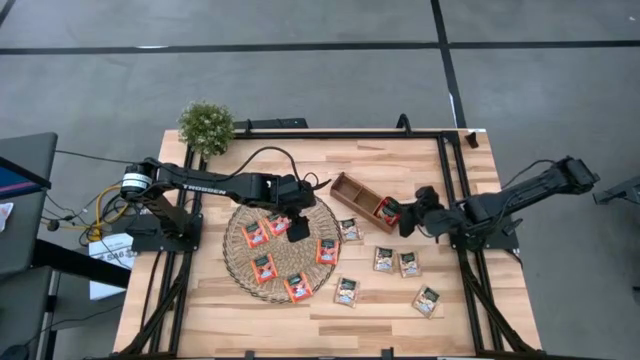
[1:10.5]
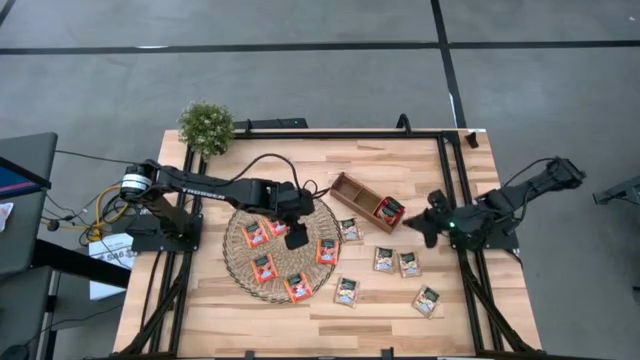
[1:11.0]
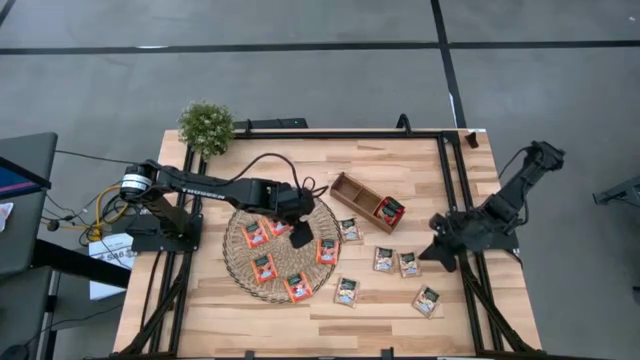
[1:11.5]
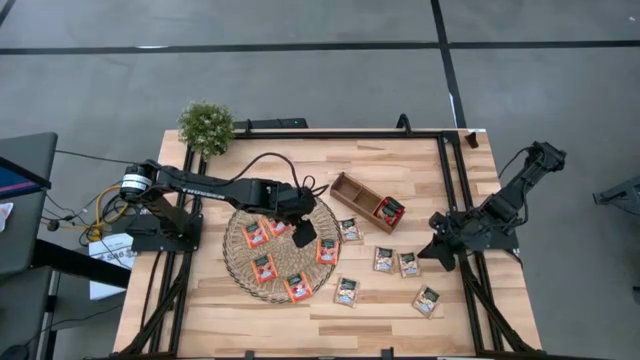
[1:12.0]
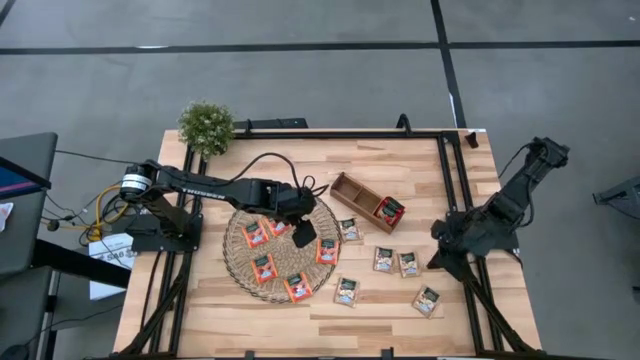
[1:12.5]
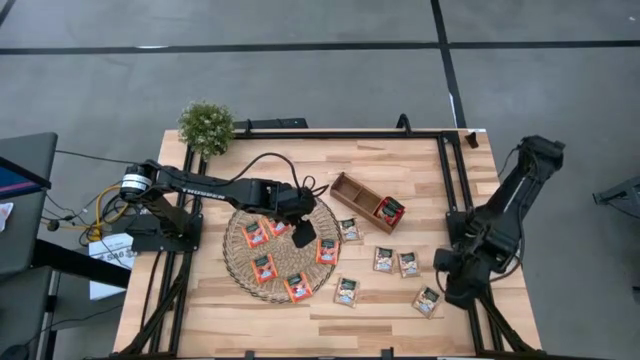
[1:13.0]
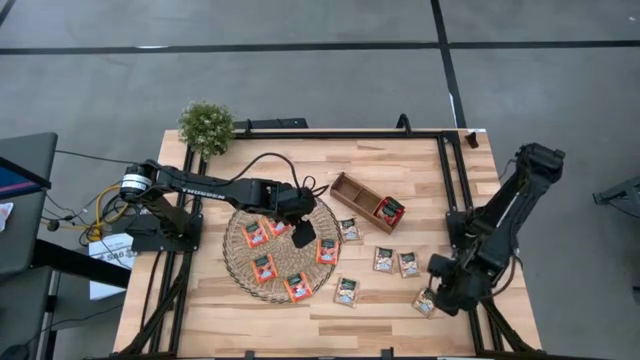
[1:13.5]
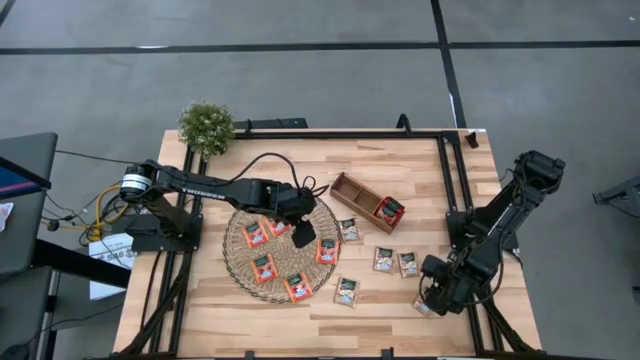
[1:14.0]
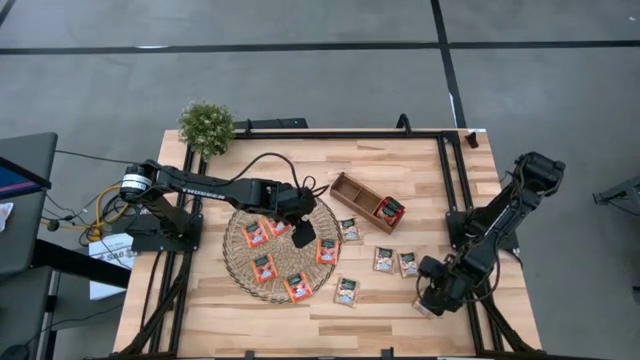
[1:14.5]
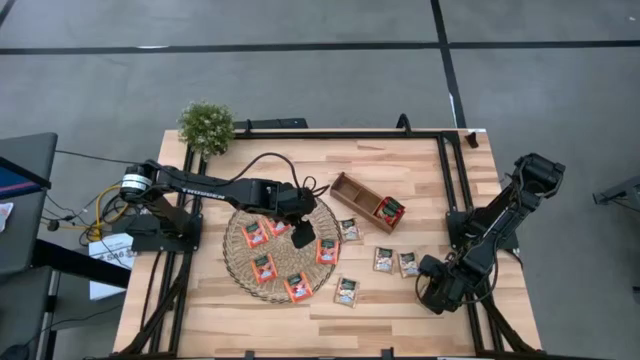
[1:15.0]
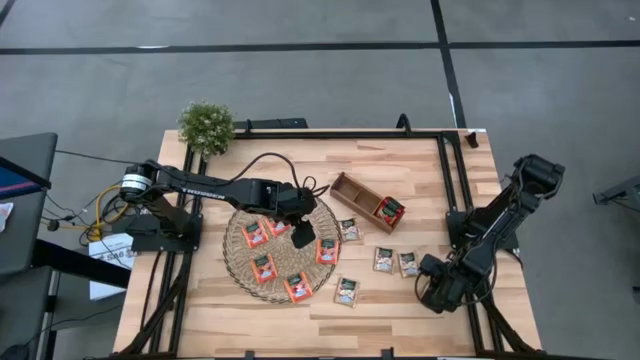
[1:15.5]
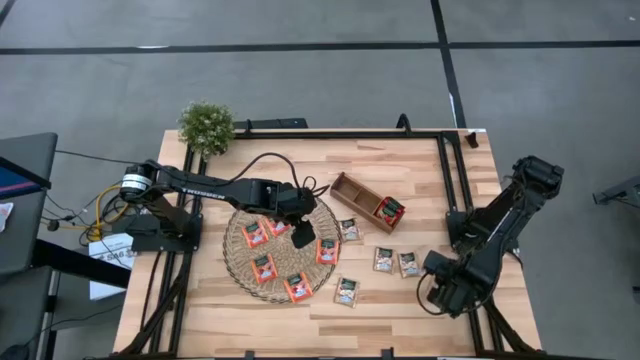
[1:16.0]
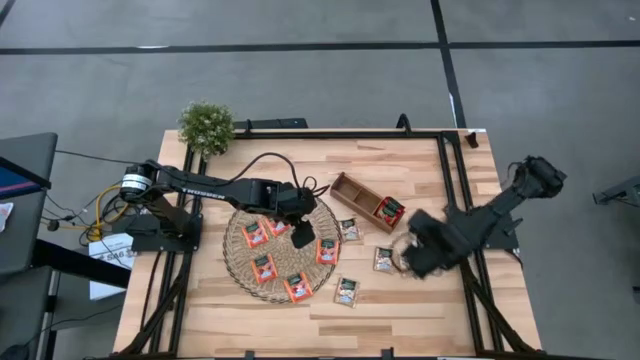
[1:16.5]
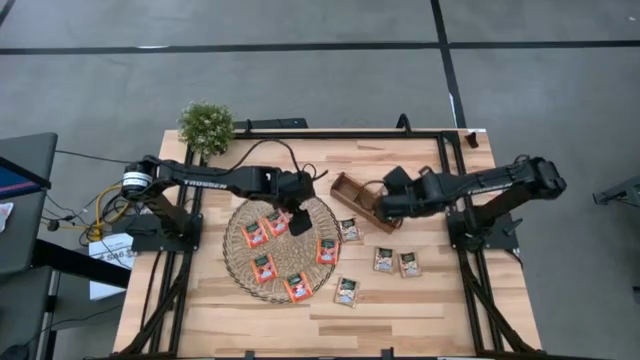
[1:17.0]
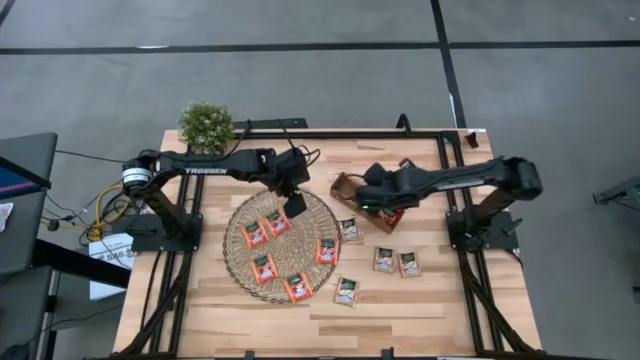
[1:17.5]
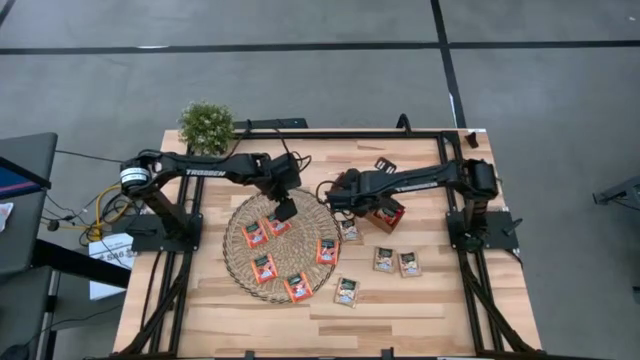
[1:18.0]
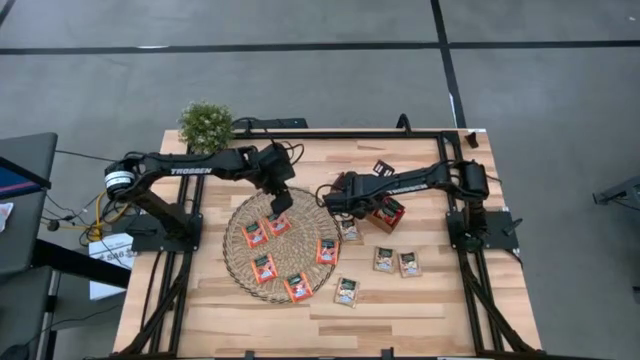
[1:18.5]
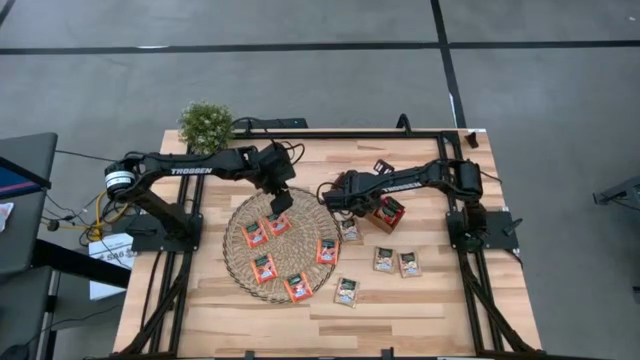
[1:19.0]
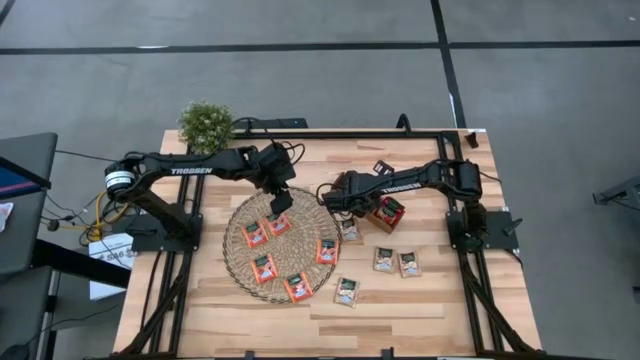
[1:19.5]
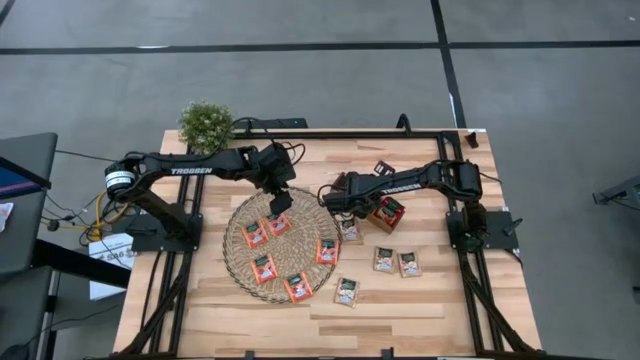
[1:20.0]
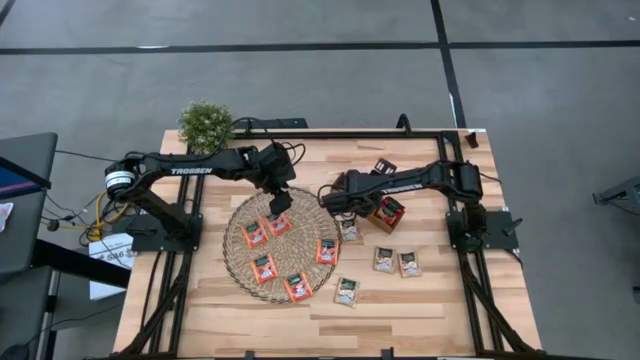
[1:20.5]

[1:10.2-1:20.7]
Task: Pick & Place Tea
Put the brown tea bag into the middle section of the wooden organizer

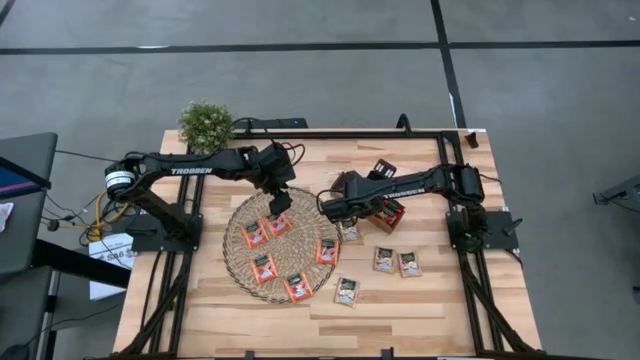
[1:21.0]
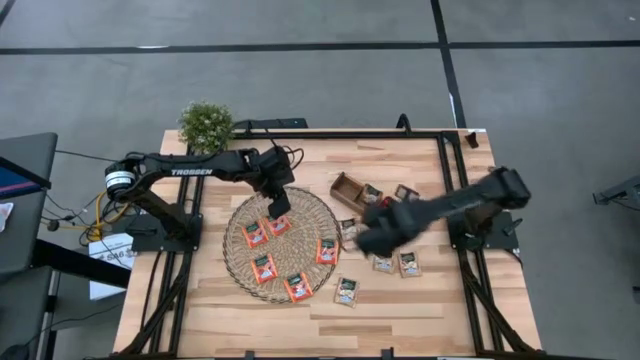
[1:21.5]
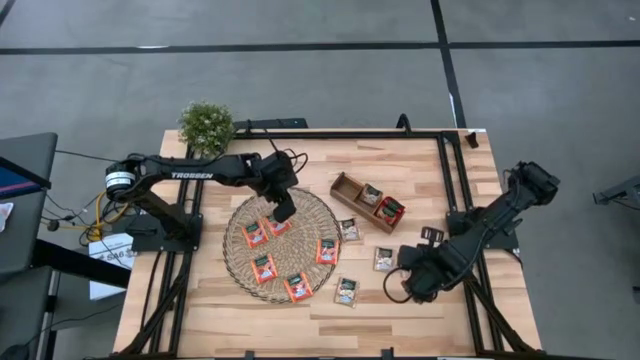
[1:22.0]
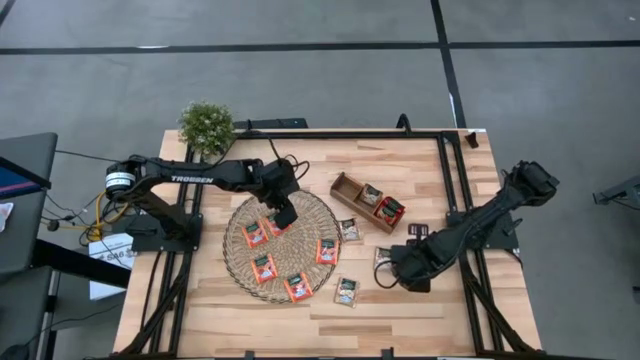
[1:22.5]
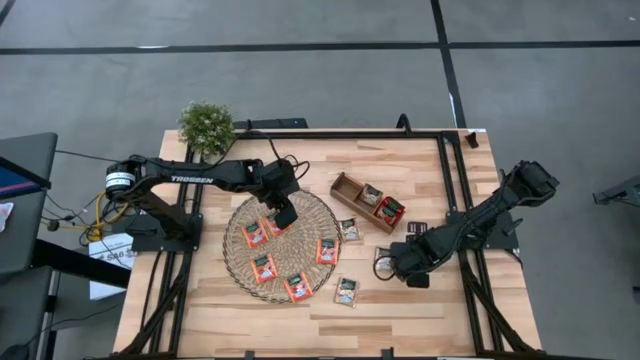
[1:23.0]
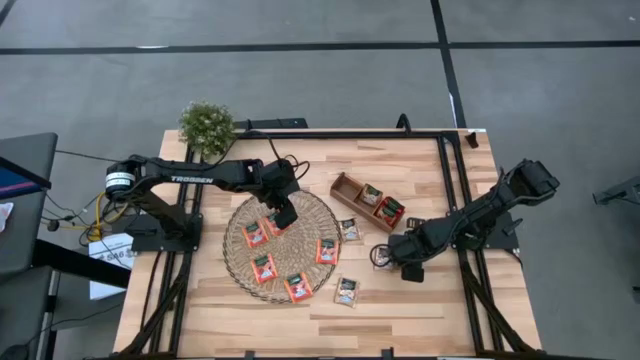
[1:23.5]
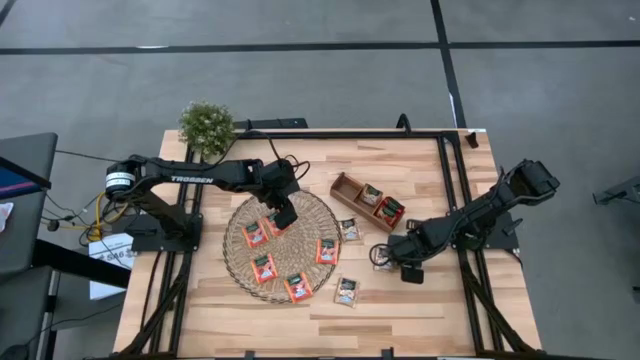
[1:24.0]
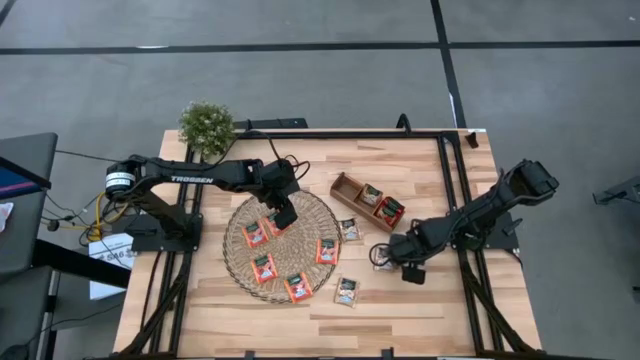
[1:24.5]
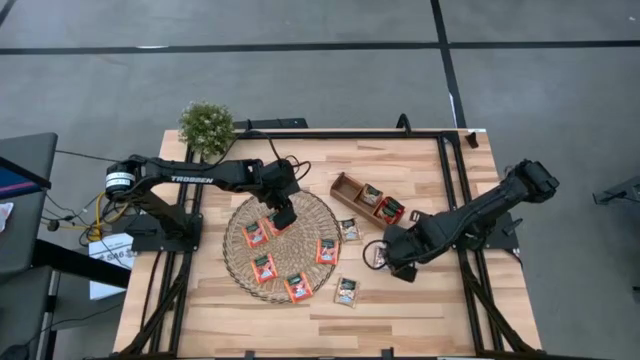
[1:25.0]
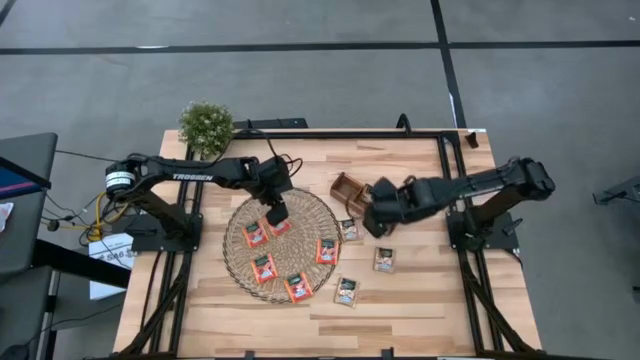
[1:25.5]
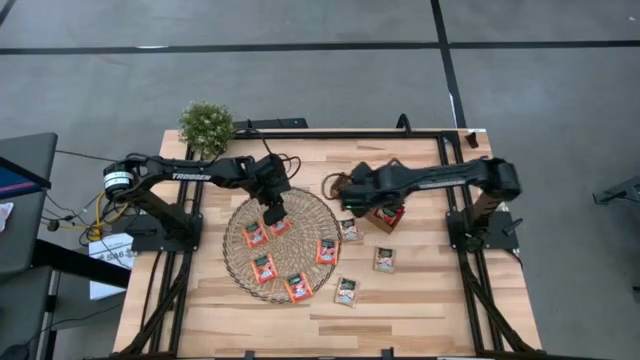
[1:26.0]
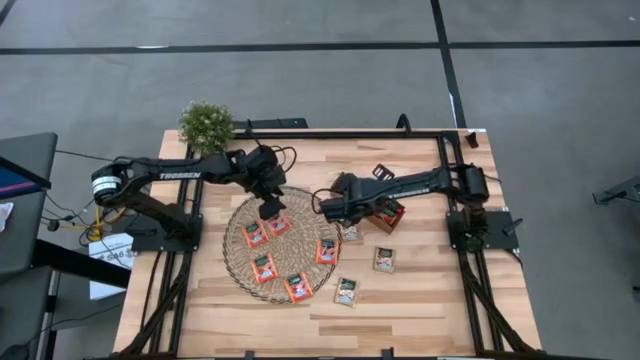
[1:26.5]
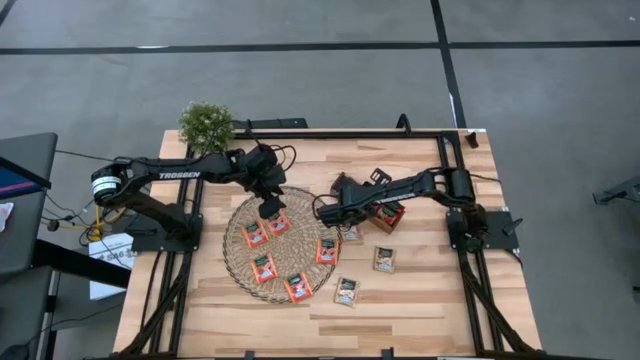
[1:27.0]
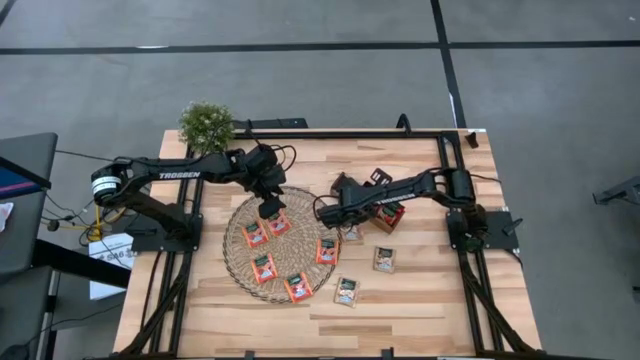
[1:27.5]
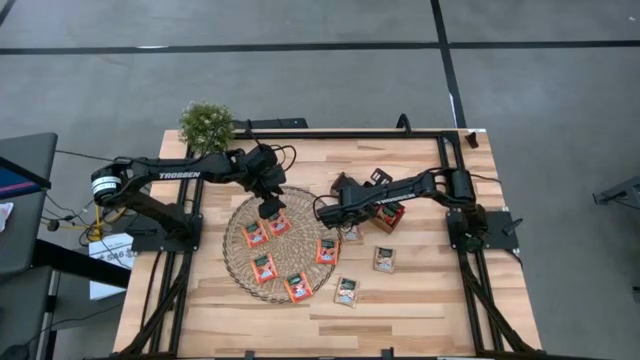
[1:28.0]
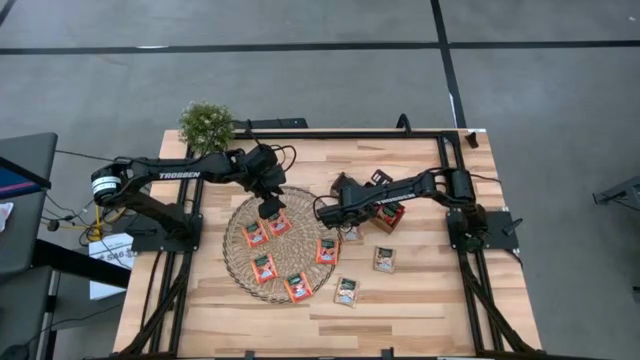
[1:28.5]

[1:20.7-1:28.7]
Put the brown tea bag into the middle section of the wooden organizer

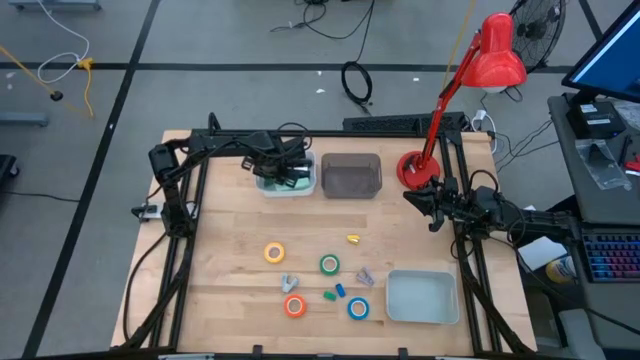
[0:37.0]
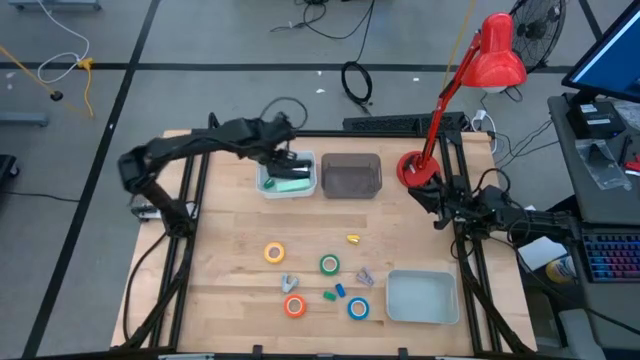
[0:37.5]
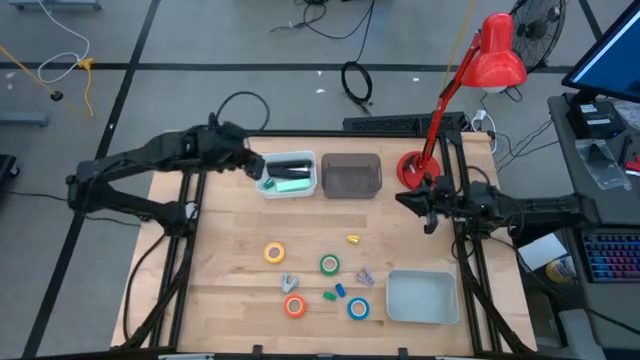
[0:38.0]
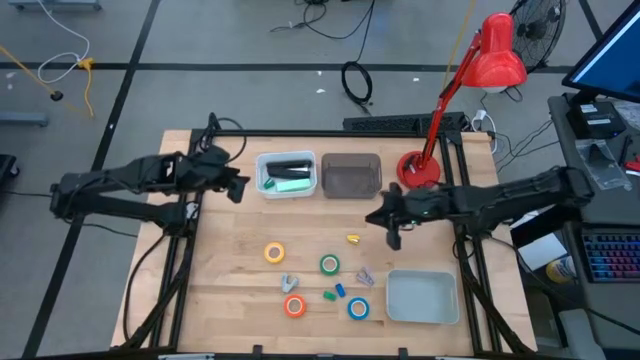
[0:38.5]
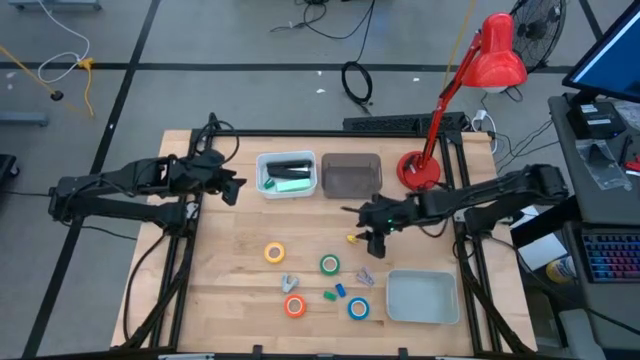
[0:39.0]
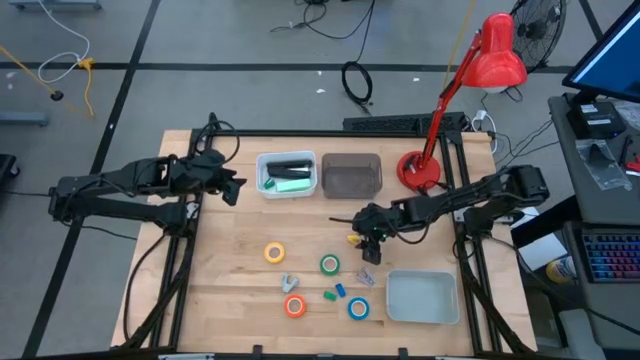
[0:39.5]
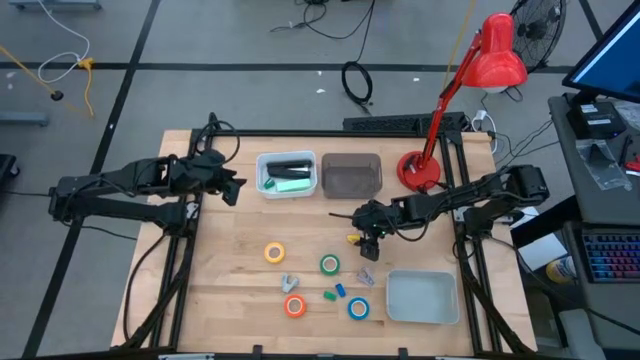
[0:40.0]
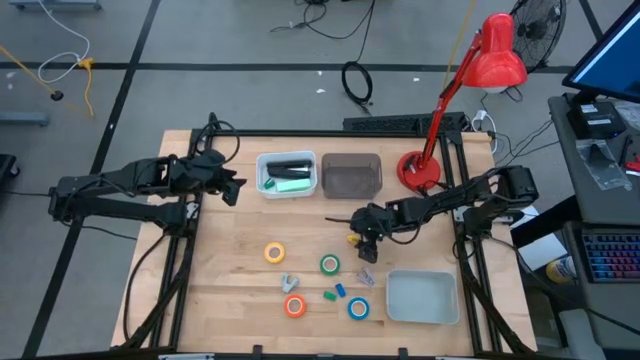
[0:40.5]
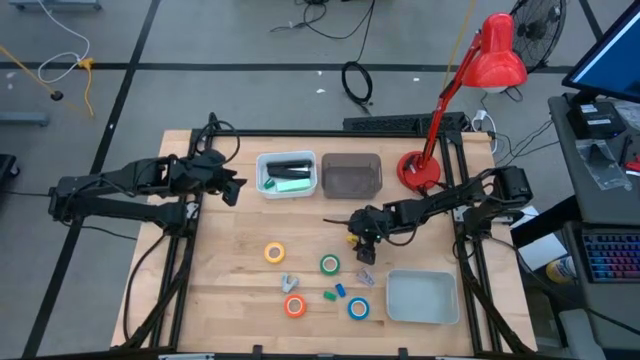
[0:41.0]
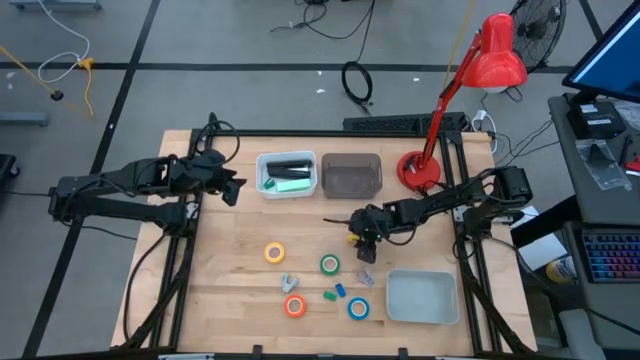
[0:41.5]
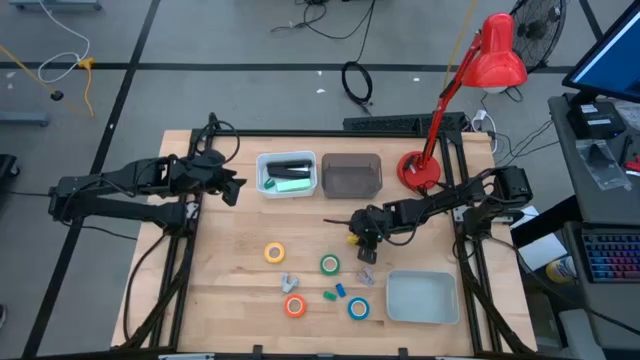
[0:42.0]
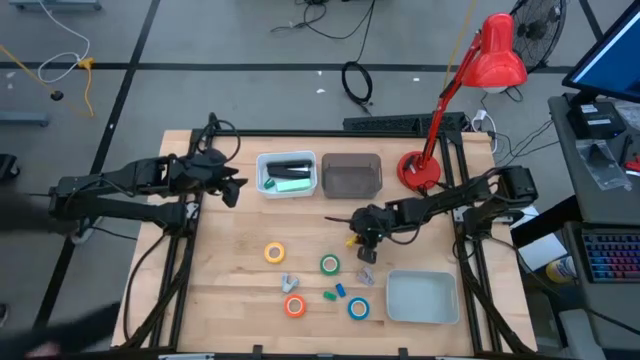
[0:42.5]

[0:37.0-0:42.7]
Task: Pick and place Stapler, Stapler remover, tape
Put the small yellow stapler into the white bin
